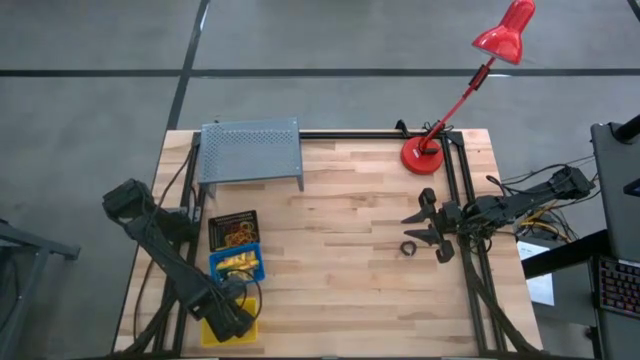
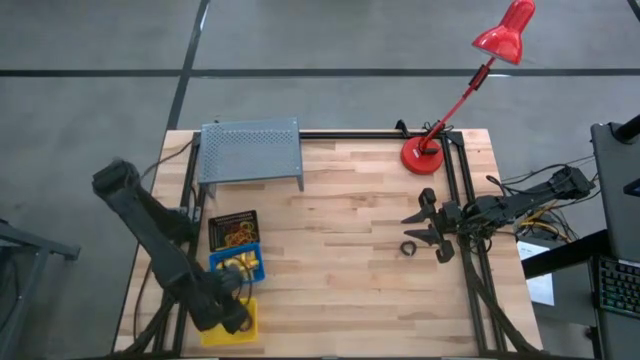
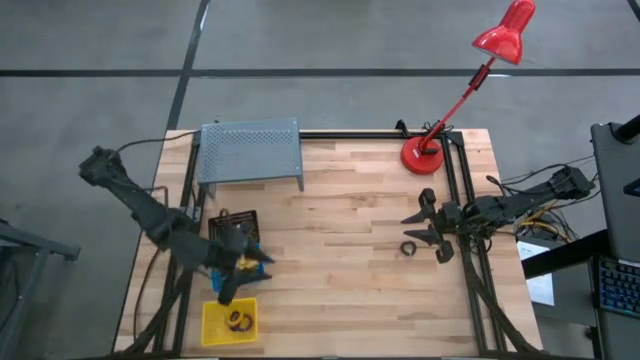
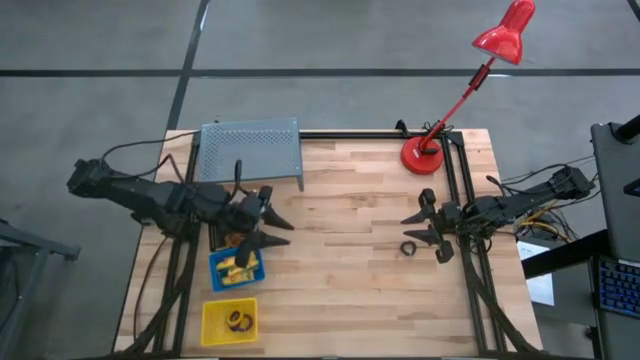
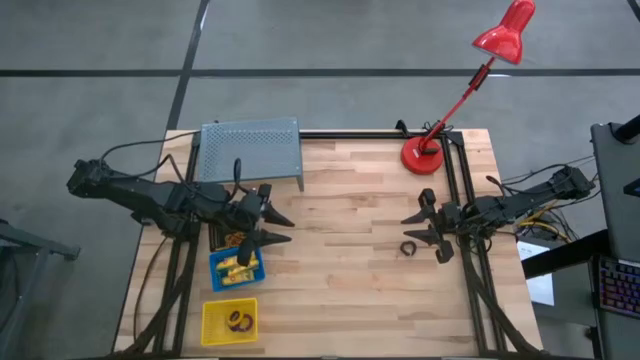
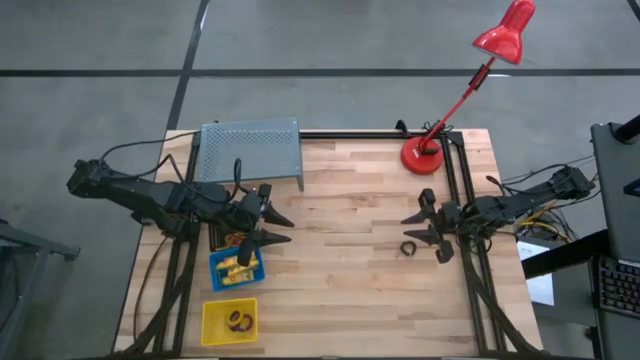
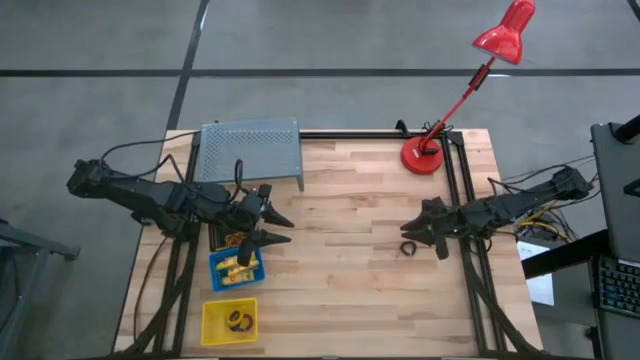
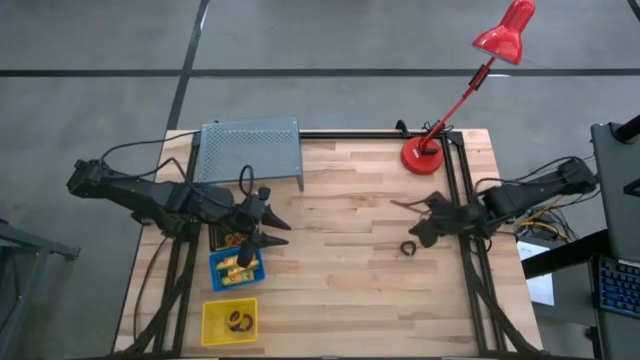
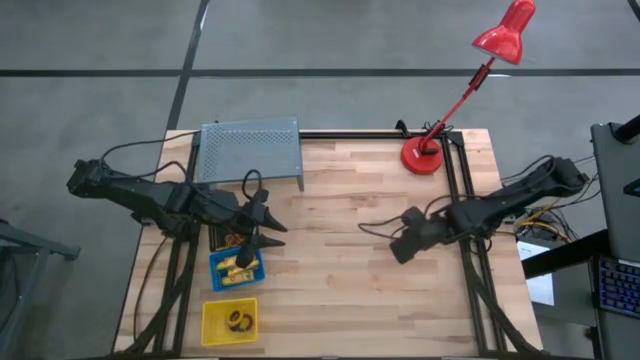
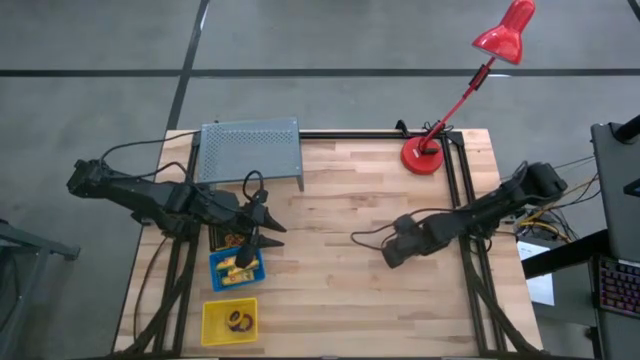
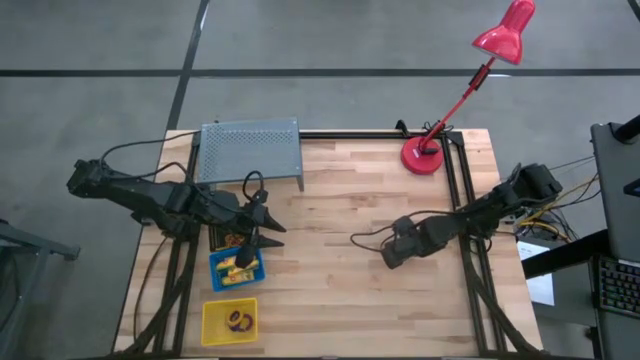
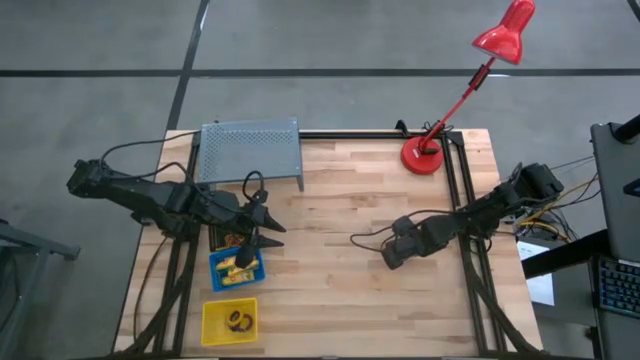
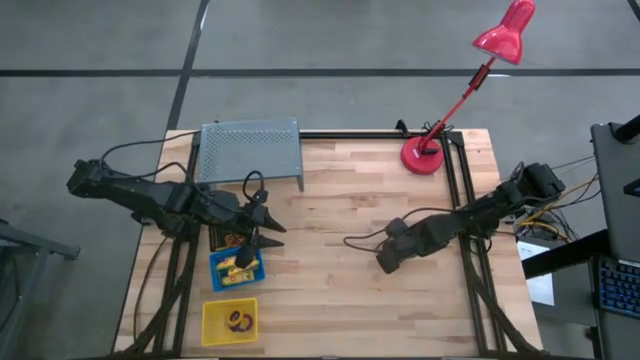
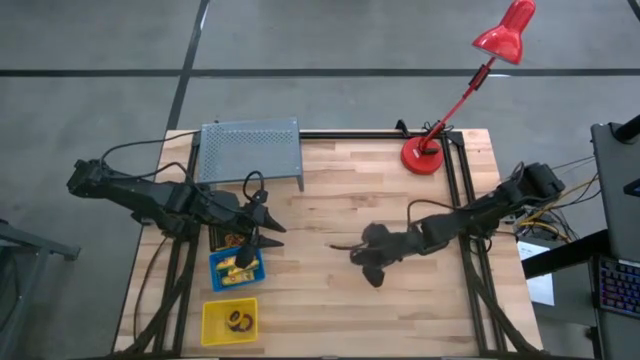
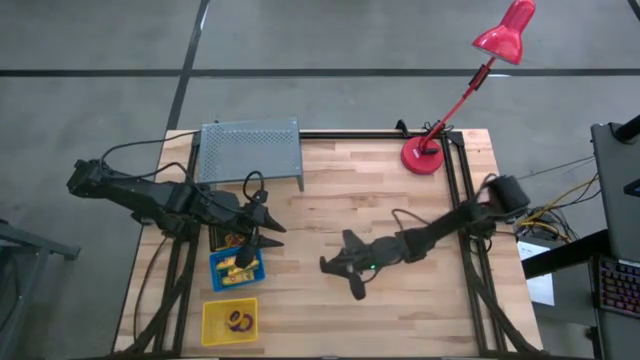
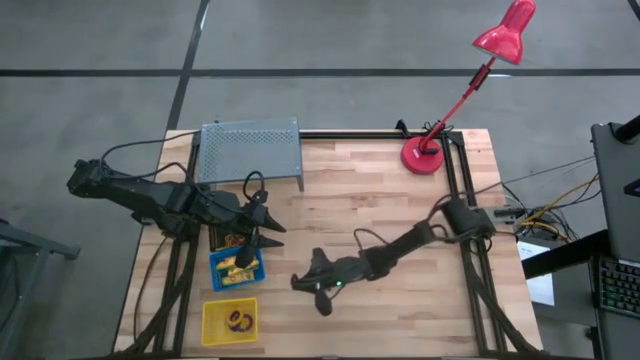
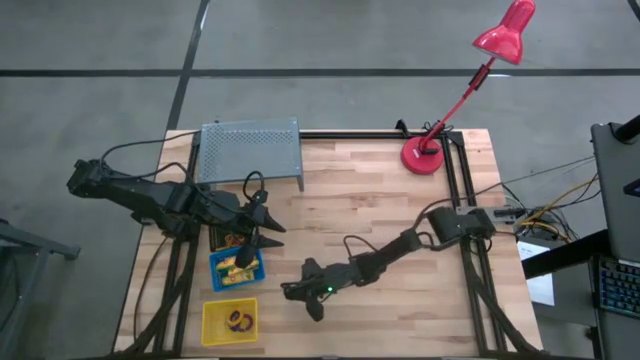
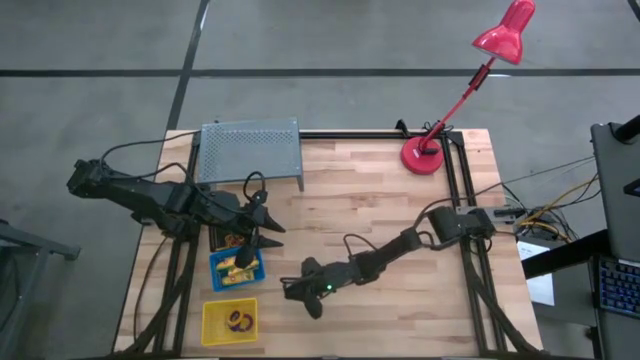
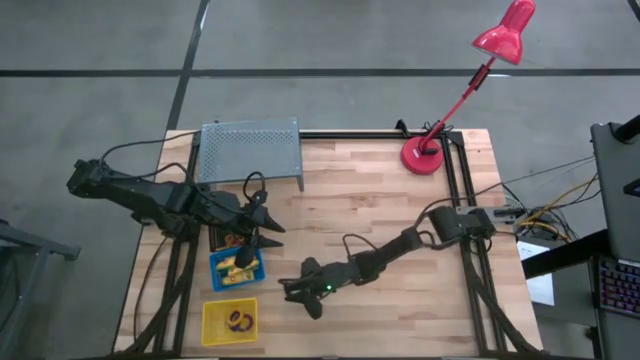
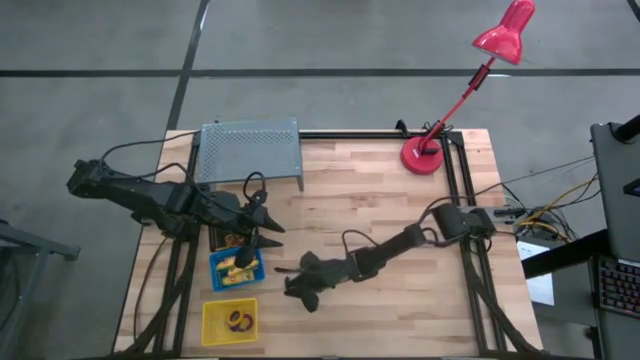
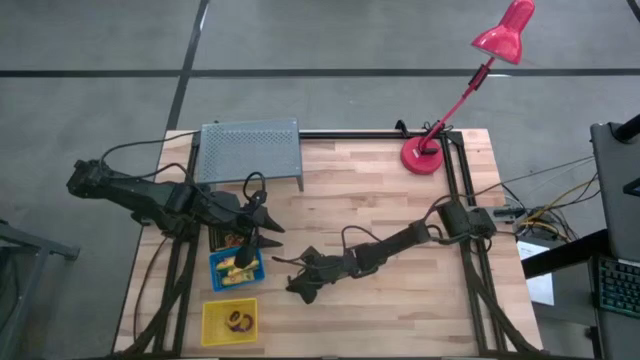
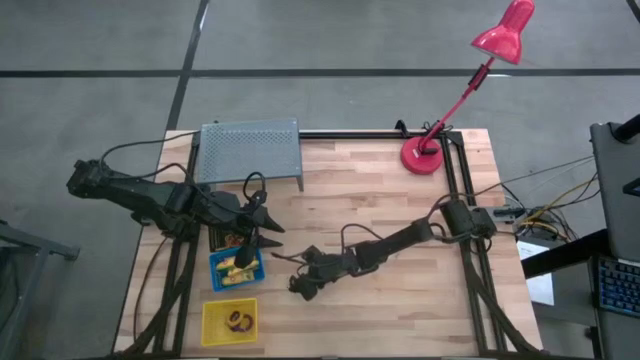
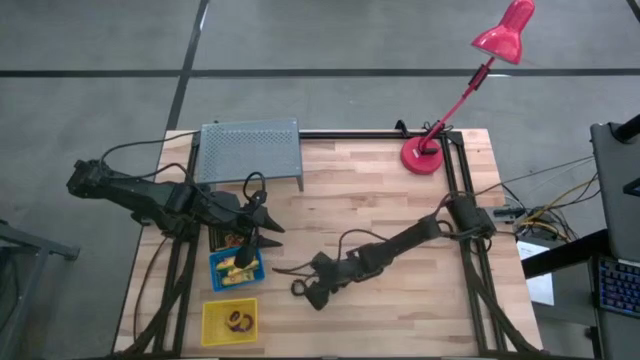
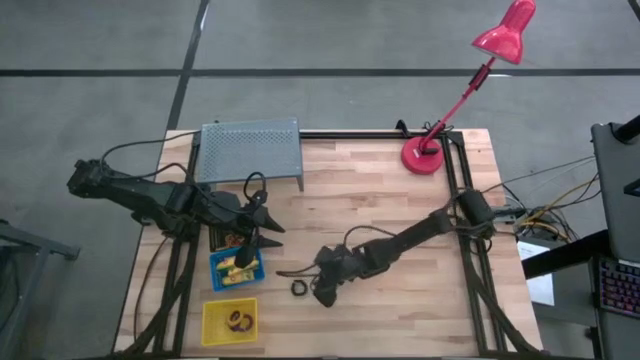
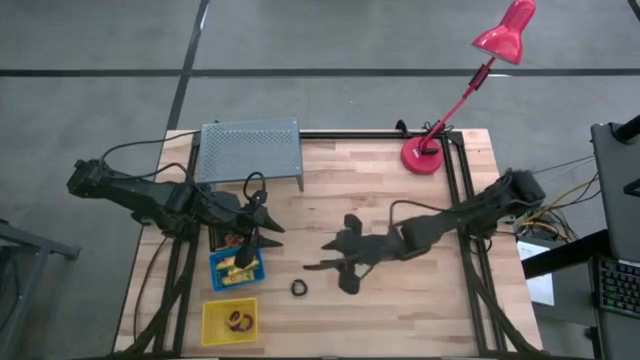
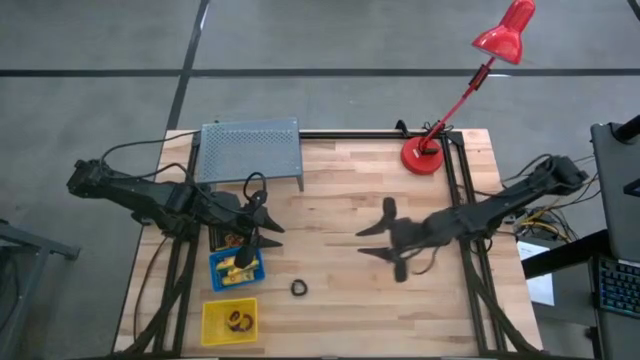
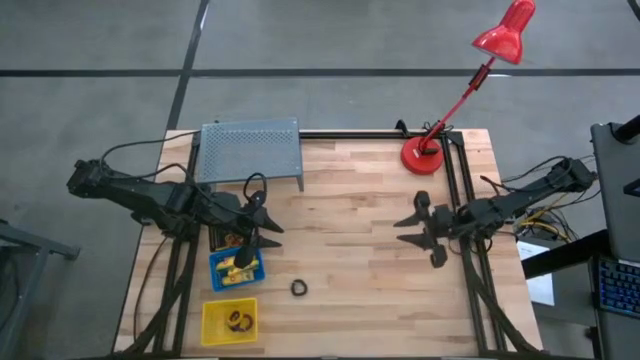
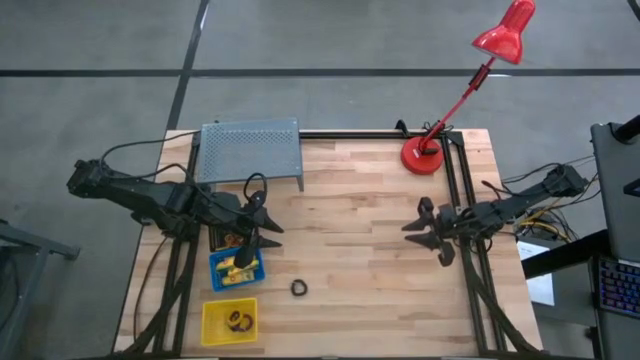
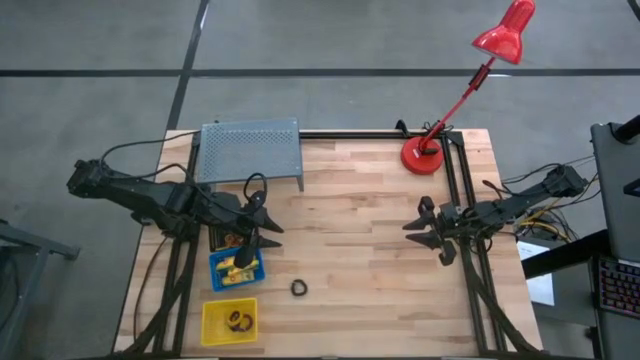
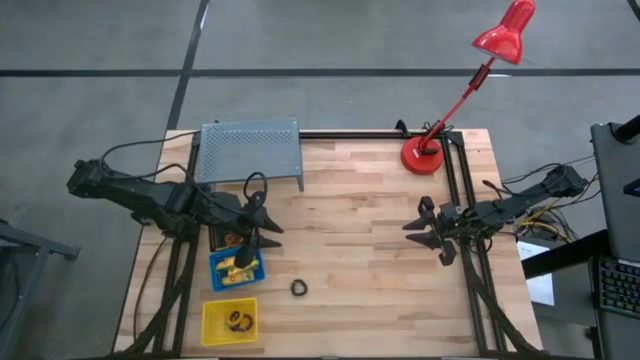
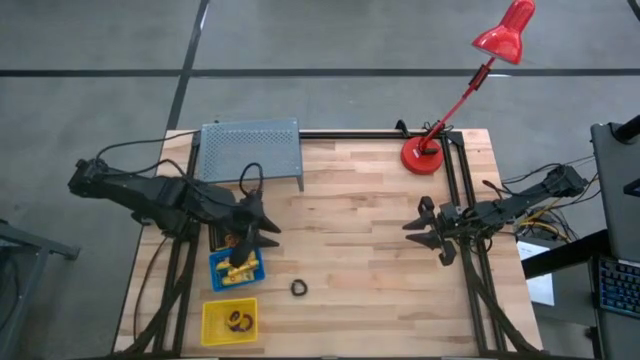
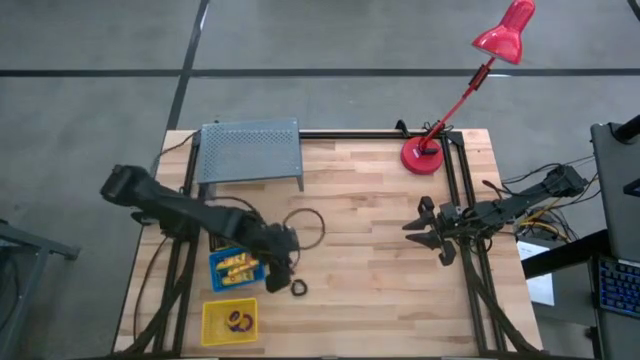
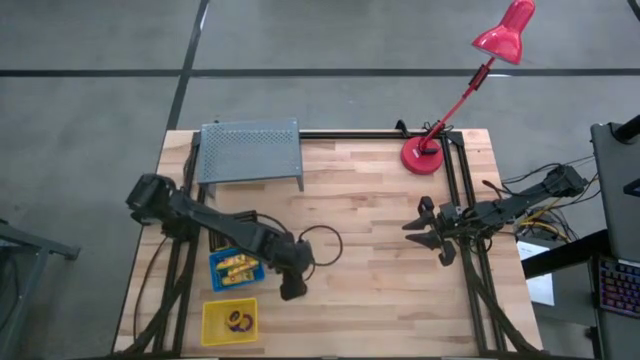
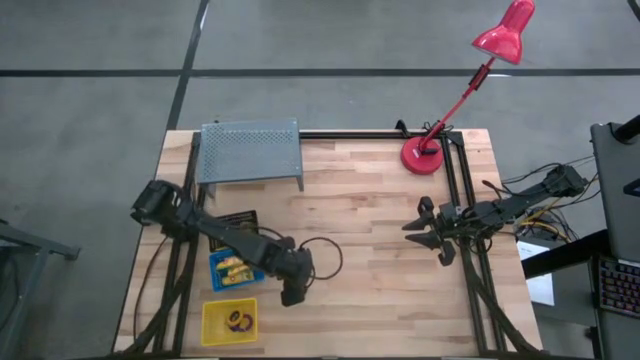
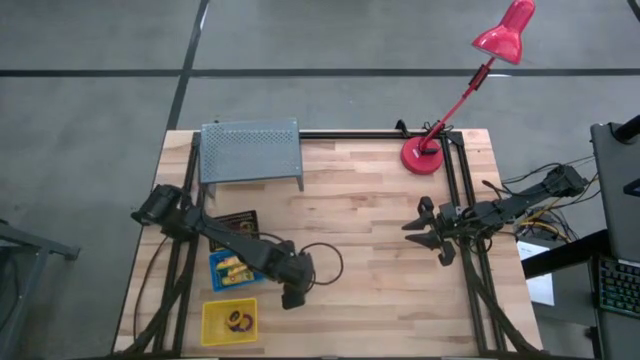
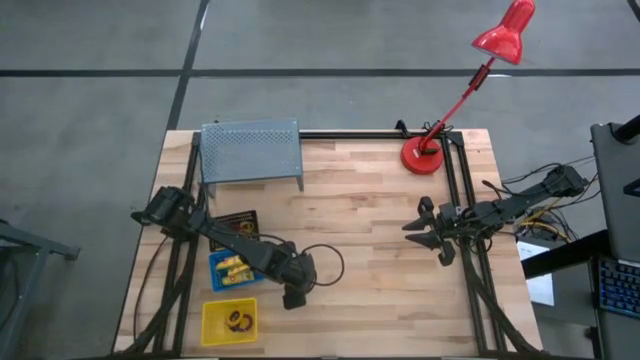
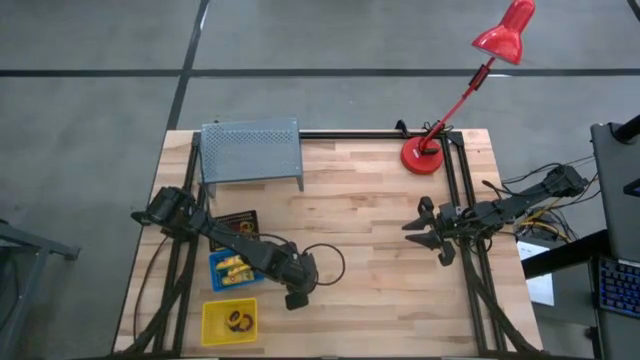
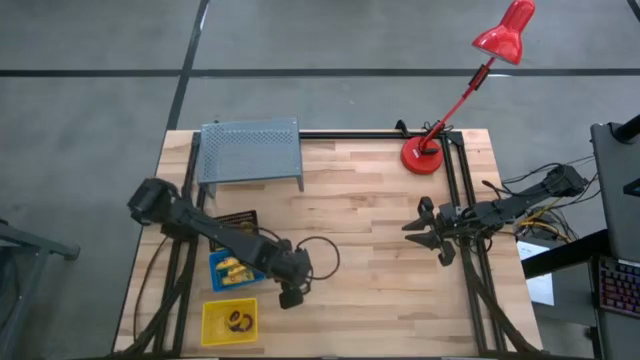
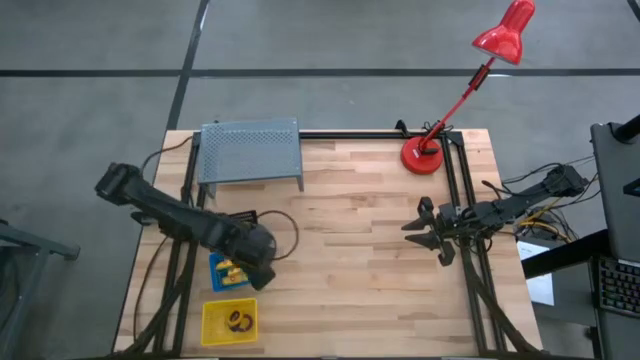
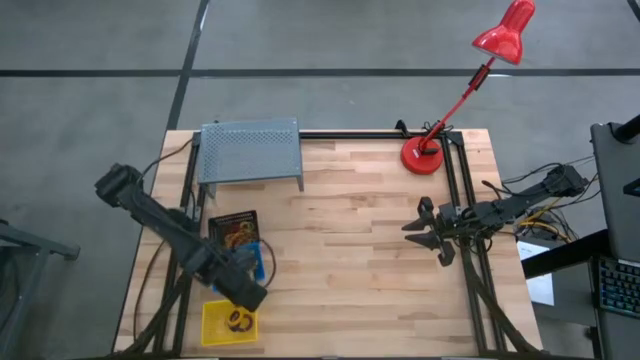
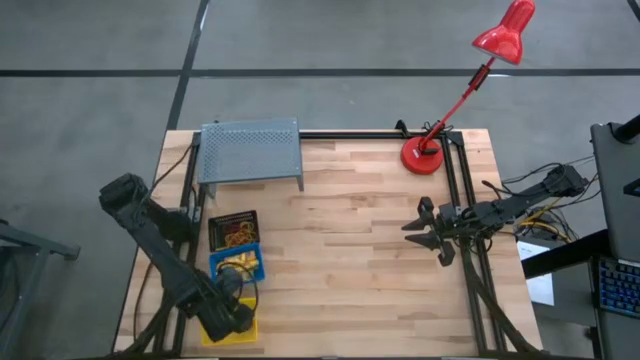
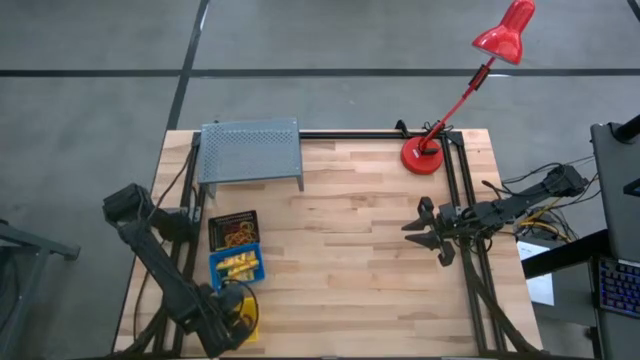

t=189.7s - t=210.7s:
Task: Pick & Place Office Desk Supplies
Put the black key chain in the yellow bin

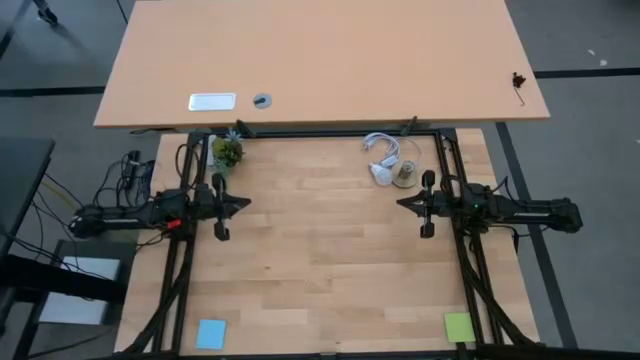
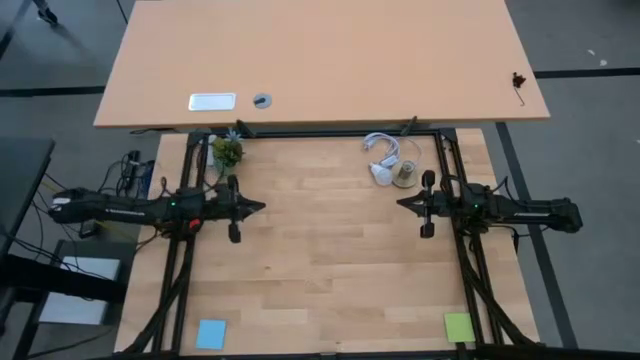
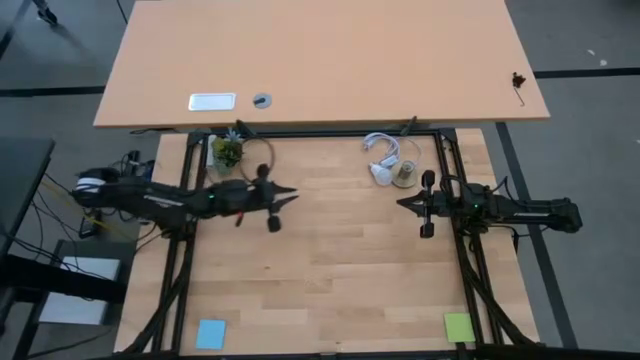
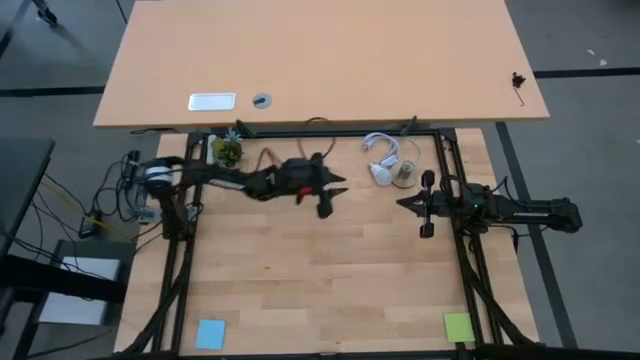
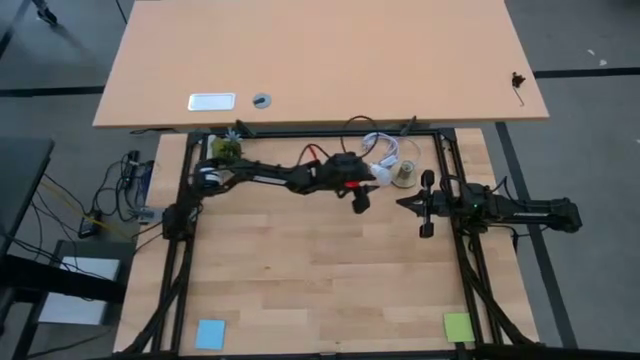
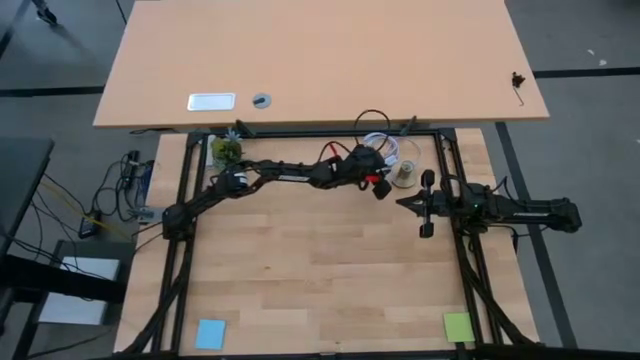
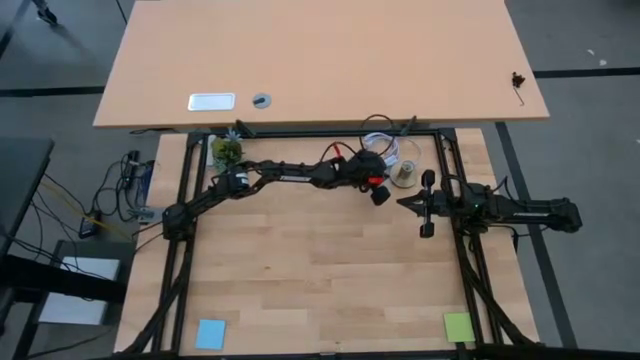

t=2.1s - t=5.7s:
Task: Screw lightbulb
Move the lightbulb to the center of the table
